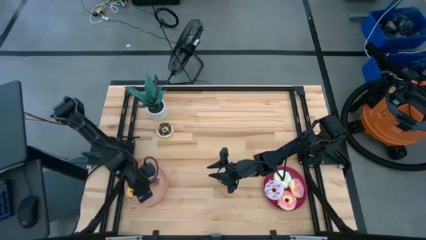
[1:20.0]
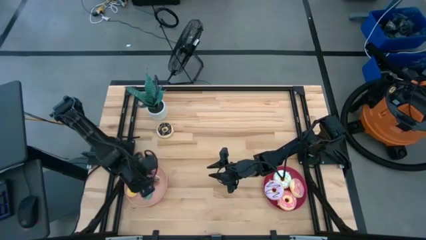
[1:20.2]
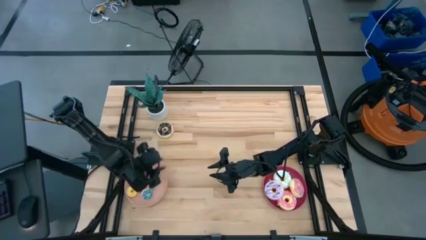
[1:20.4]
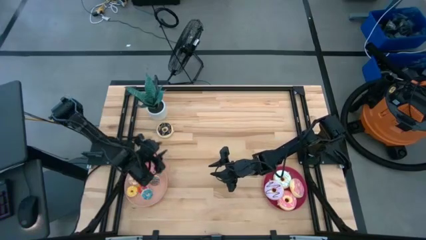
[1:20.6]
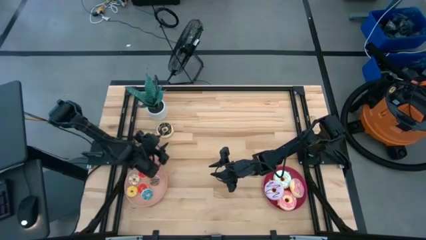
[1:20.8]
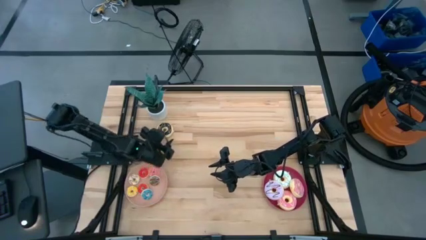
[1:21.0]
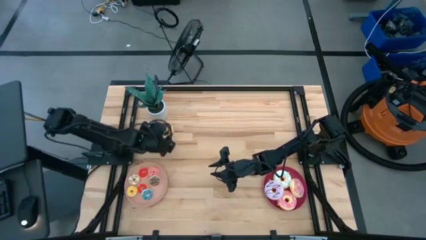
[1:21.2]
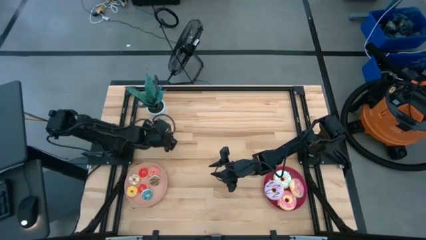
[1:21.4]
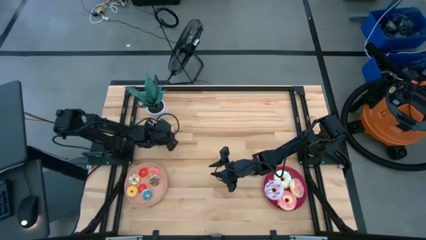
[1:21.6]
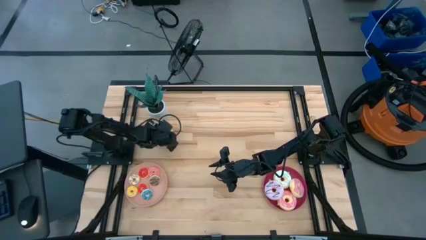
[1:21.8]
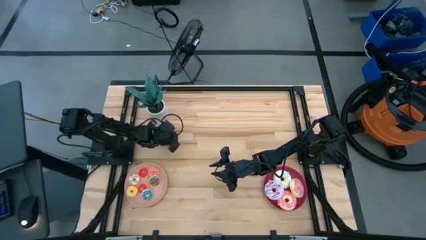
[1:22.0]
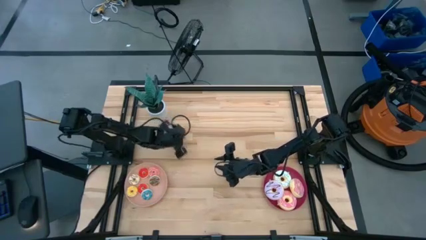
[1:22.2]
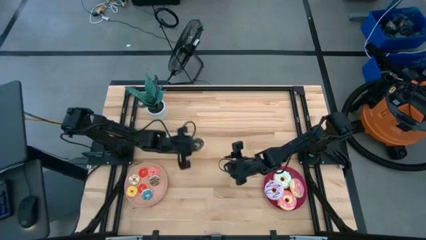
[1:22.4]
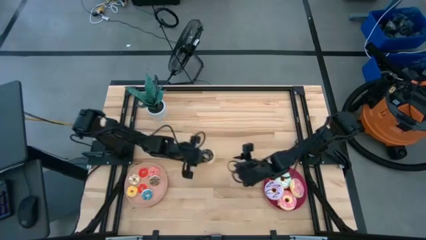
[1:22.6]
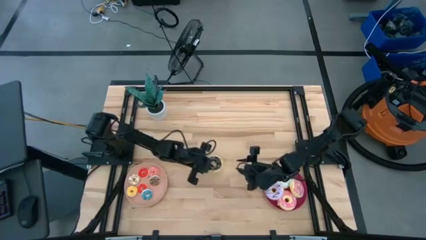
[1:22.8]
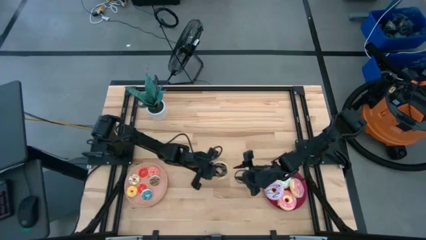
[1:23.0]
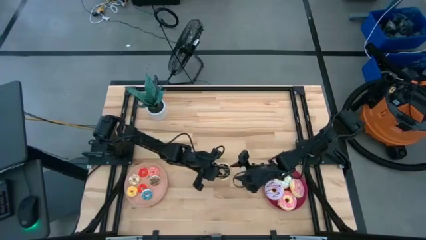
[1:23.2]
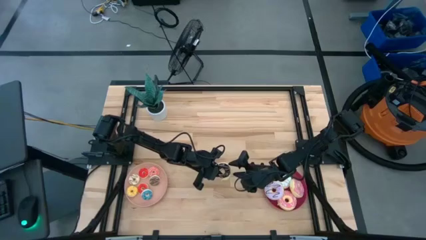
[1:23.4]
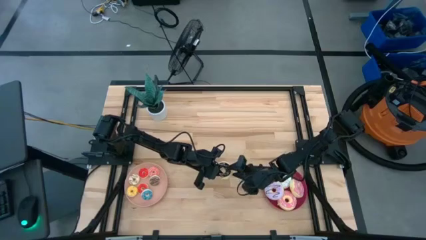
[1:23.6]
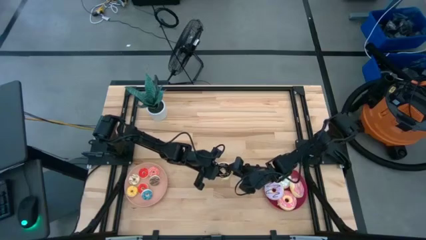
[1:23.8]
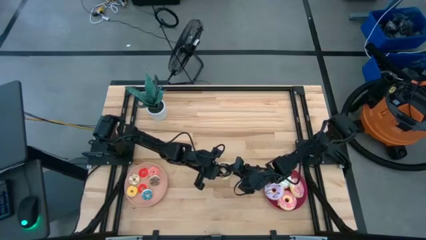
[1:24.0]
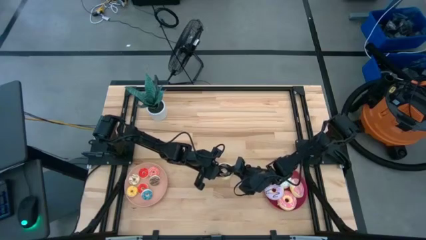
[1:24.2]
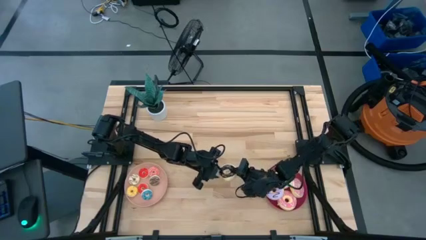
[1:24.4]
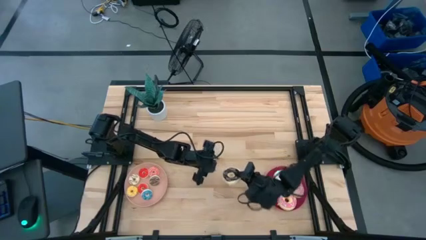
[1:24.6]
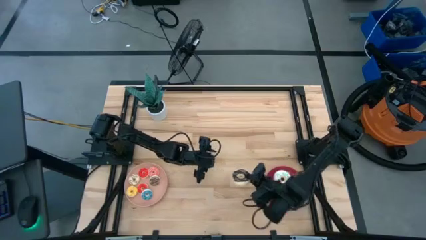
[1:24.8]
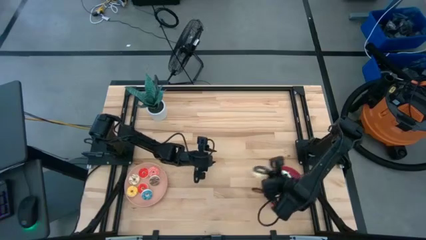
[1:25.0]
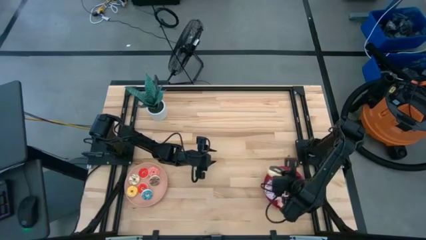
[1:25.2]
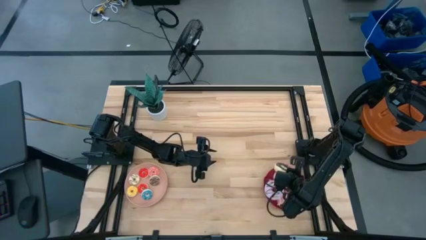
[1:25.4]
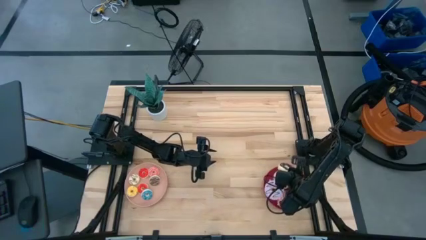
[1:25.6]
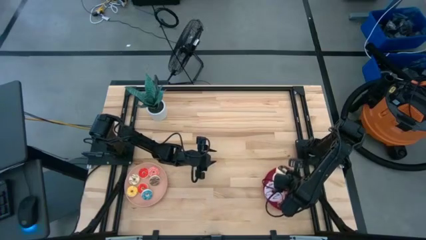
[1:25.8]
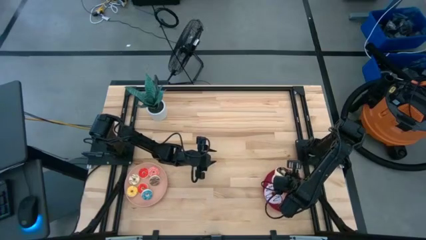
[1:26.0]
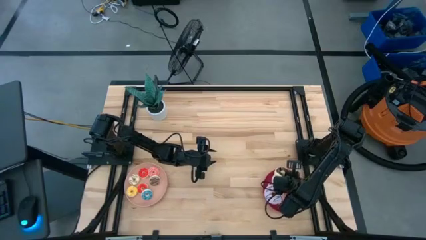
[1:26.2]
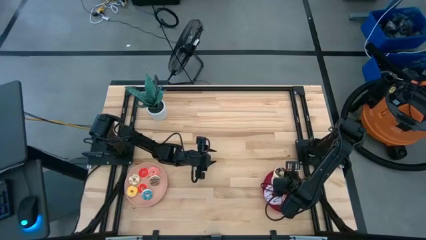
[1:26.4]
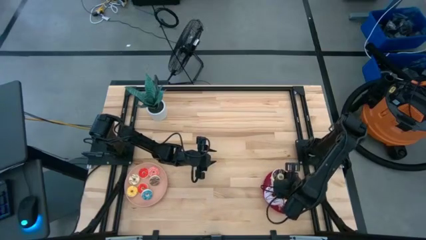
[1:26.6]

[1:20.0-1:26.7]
Task: Pick & Place donuts
Put the big black donut on the dark pink plate

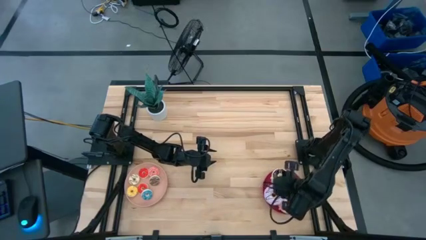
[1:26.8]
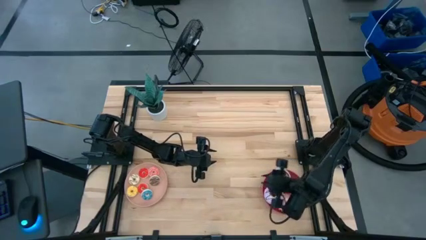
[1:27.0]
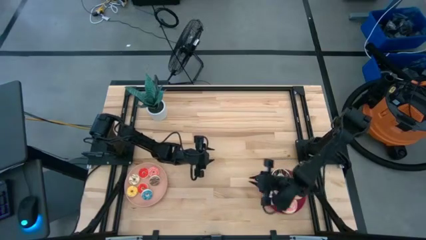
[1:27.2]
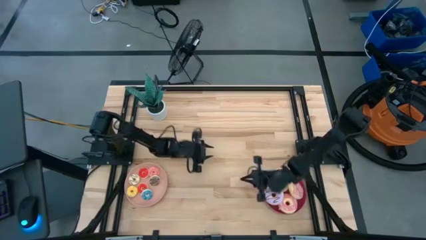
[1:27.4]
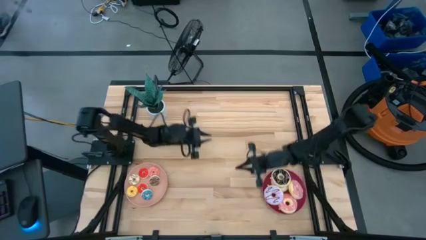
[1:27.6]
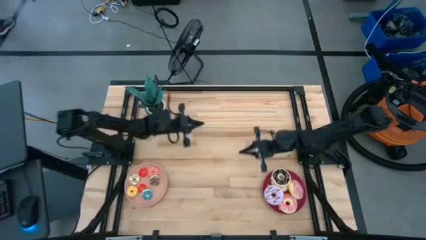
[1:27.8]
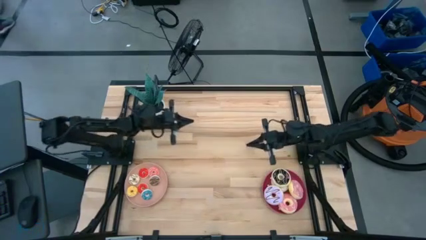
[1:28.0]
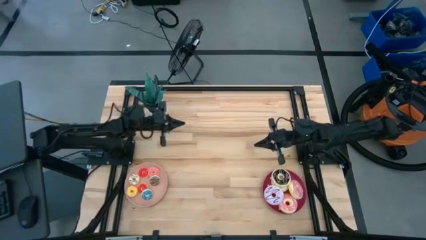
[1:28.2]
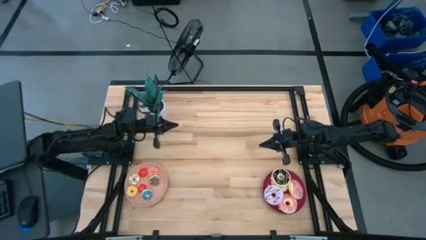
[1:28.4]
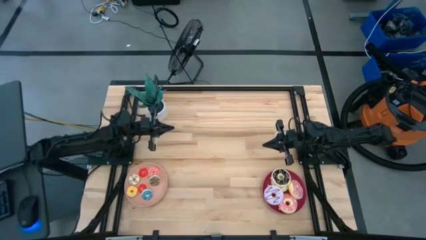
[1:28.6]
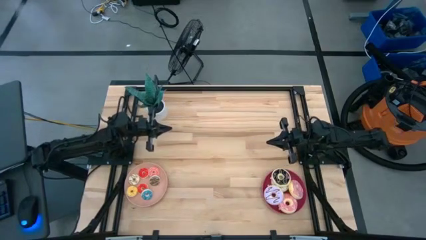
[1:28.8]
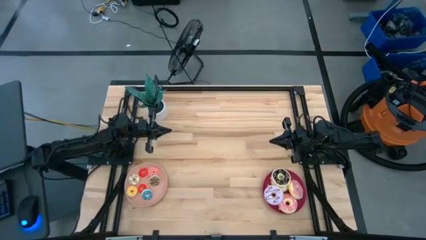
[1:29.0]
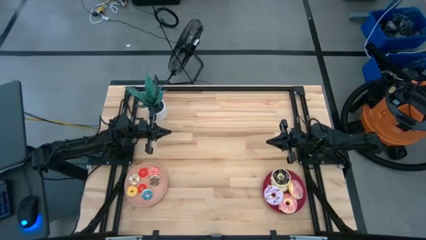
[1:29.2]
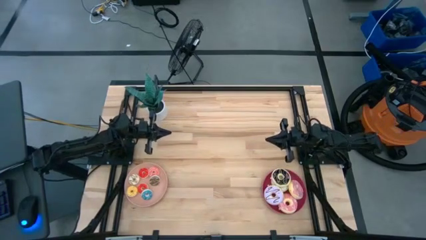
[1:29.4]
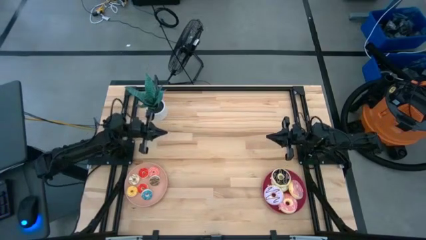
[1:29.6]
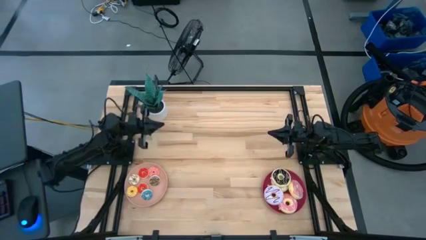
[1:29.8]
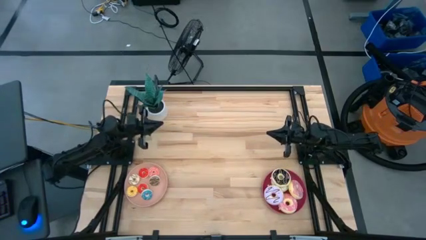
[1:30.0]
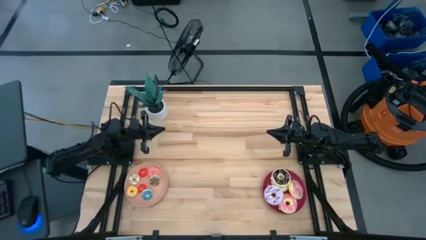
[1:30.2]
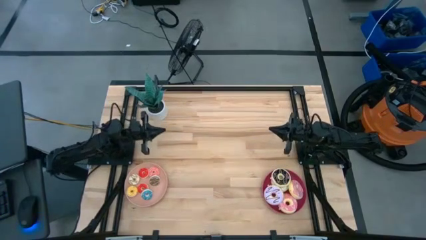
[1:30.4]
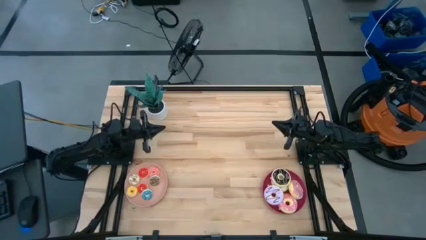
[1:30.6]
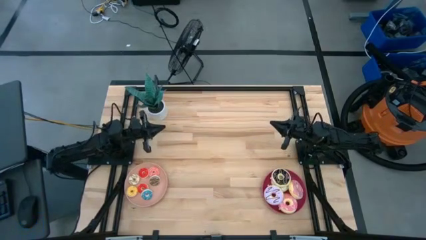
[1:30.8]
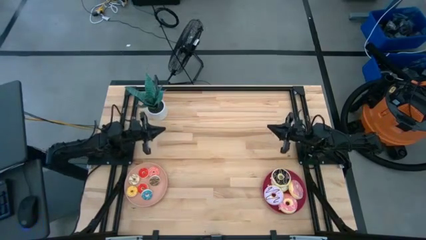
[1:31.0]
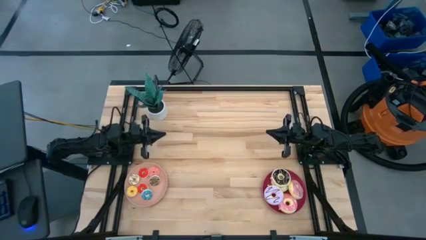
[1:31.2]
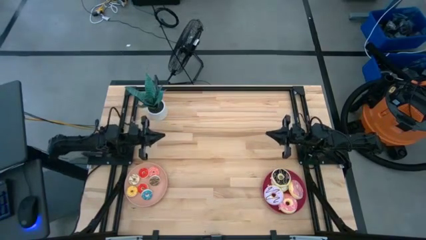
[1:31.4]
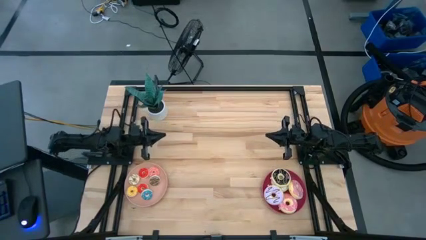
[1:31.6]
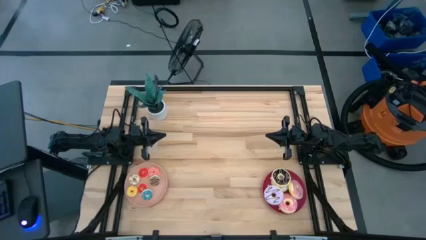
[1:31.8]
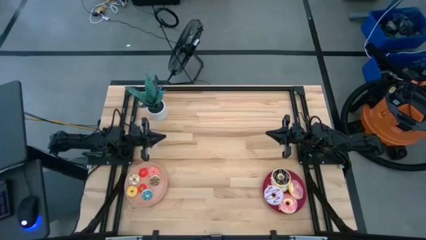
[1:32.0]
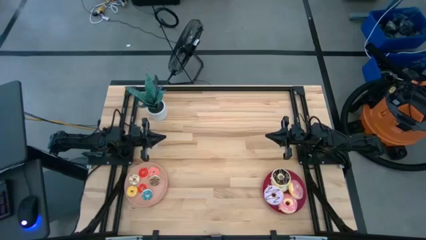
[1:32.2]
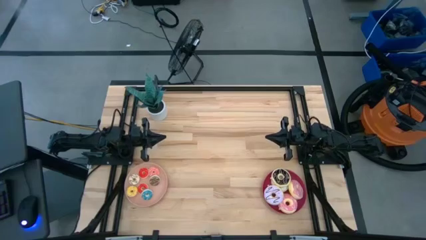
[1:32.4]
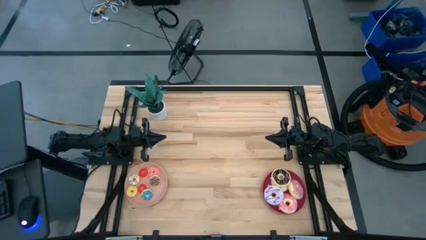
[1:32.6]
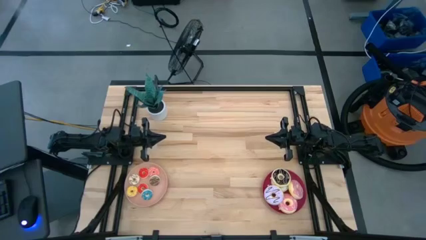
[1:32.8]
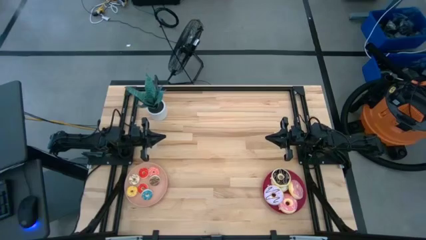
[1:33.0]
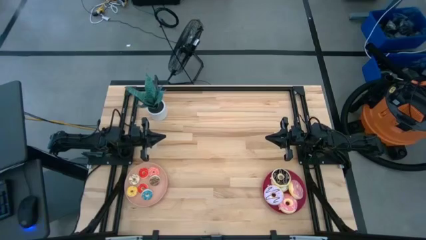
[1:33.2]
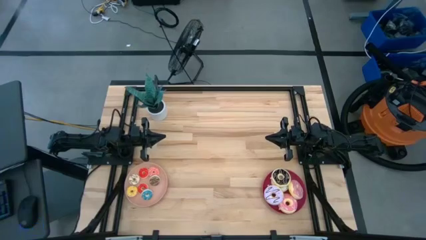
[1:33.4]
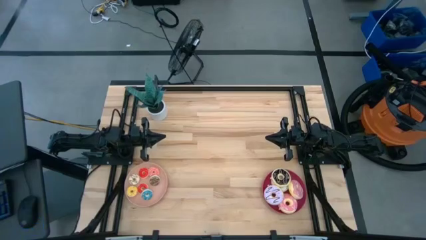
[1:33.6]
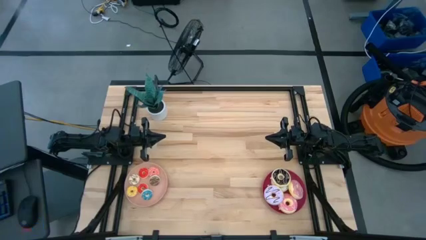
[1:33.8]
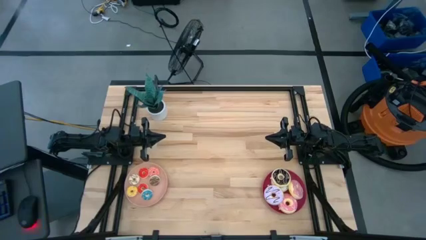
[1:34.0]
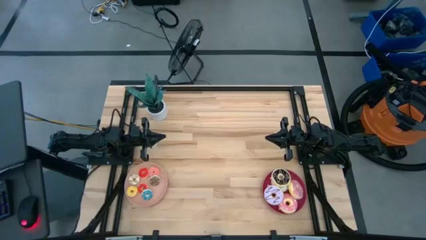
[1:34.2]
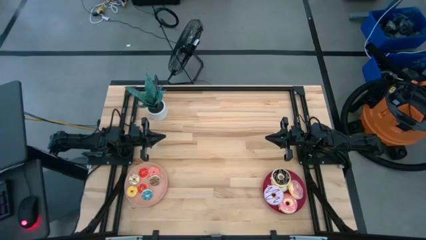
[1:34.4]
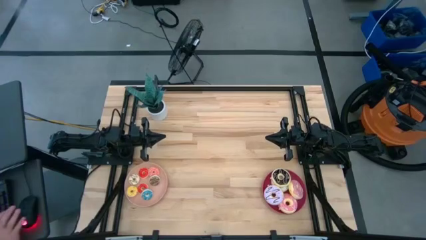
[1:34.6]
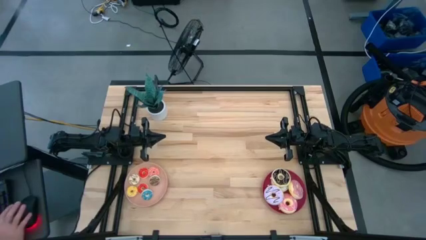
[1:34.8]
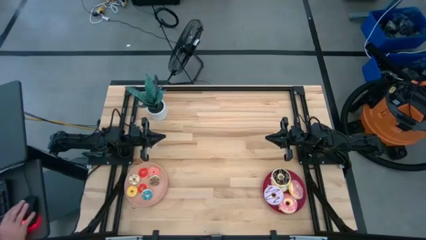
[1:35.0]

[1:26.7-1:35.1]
Return to Home Position

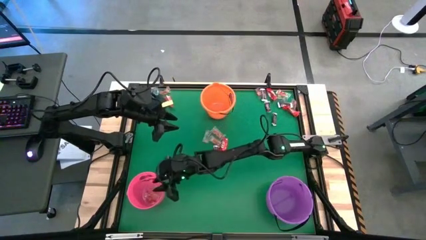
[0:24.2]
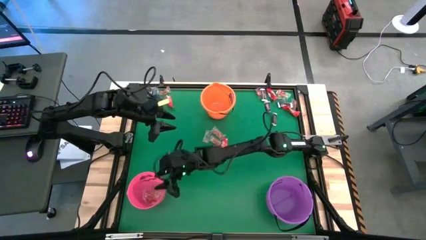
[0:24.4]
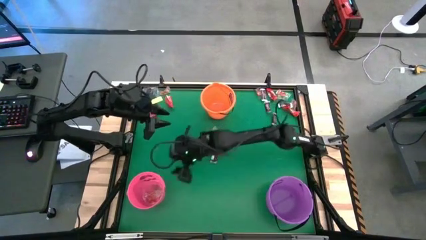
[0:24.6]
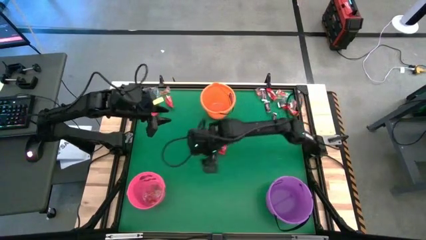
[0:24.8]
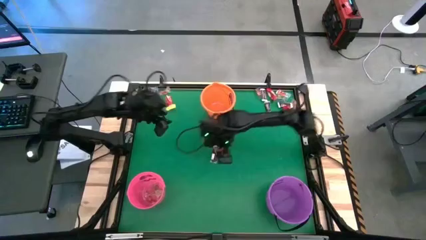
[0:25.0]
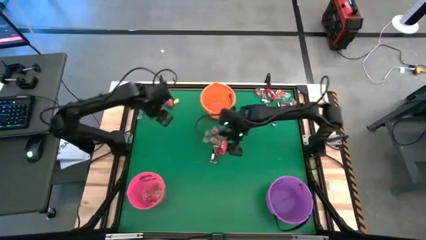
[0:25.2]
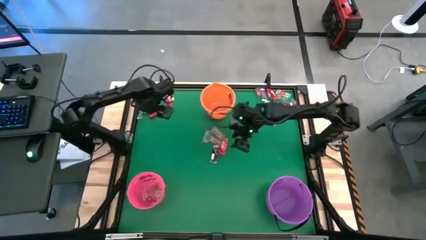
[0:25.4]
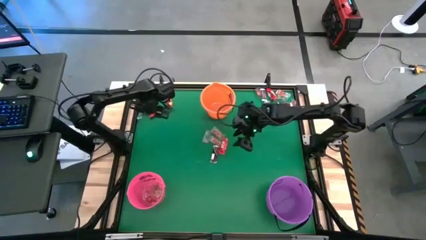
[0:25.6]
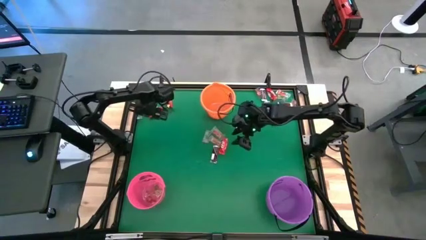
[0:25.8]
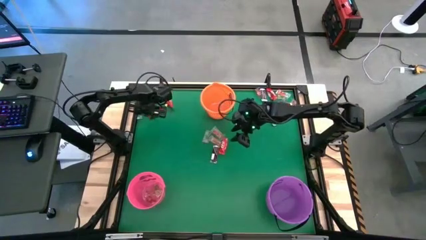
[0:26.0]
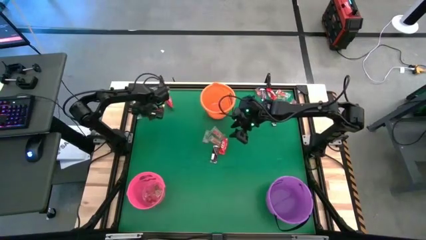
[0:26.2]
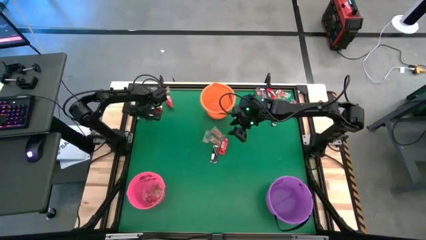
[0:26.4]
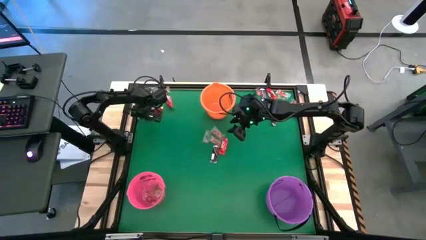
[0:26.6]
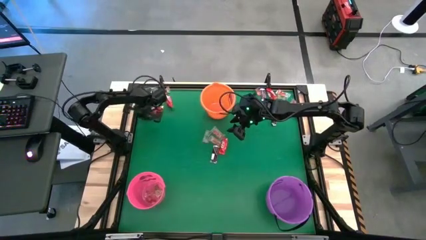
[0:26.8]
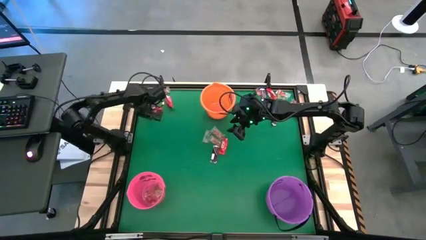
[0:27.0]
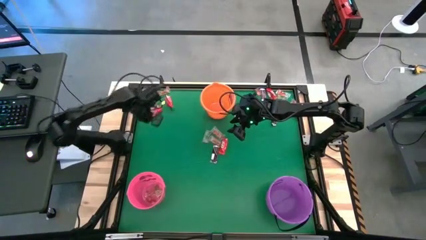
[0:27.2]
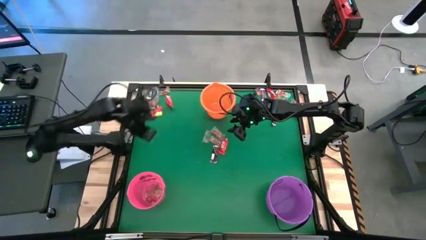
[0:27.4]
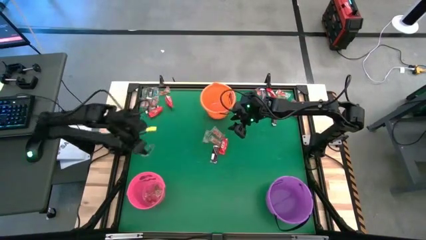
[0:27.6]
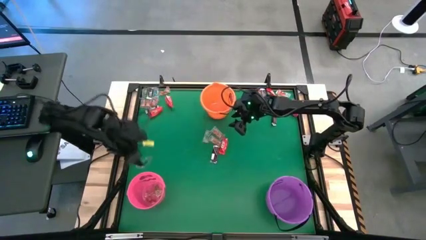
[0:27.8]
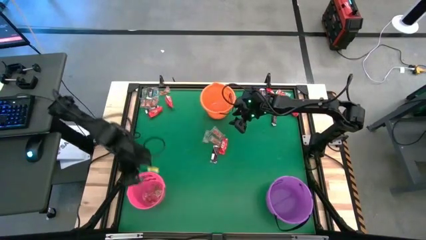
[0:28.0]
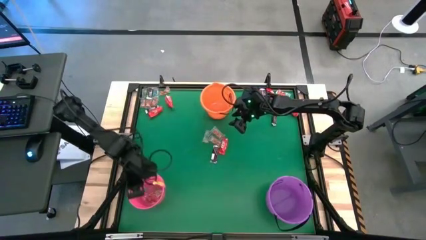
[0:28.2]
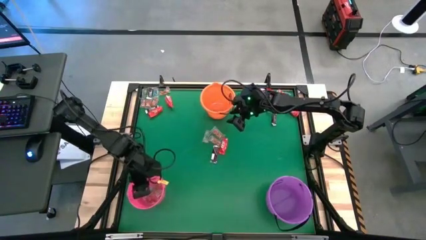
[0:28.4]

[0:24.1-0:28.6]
Task: Sort candy by brand, put in halloween buckets
Put the blue gummy into the pink bucket
